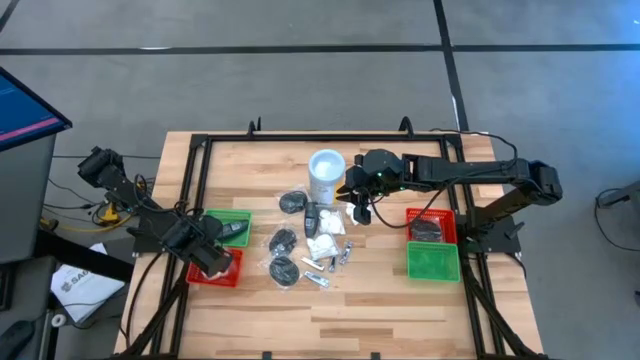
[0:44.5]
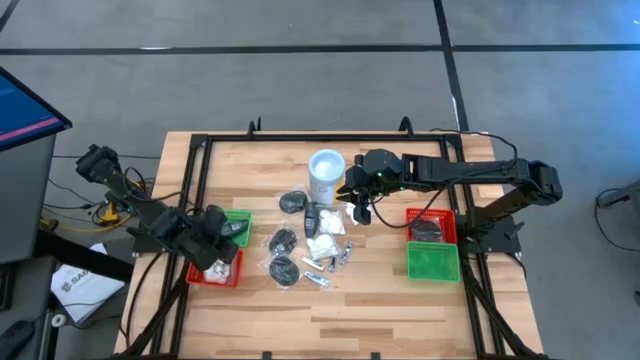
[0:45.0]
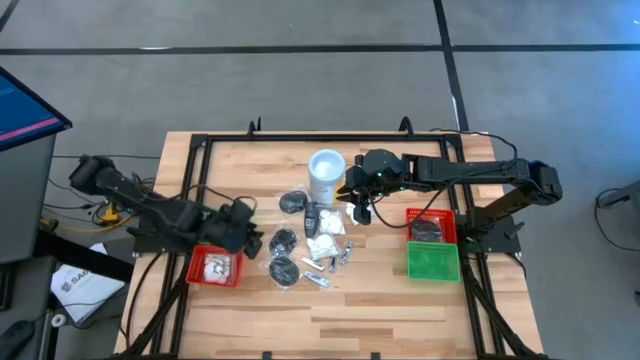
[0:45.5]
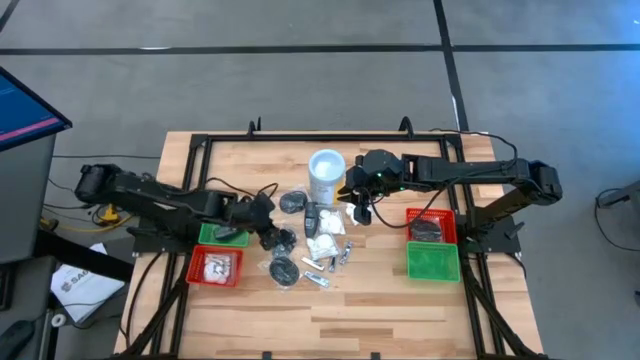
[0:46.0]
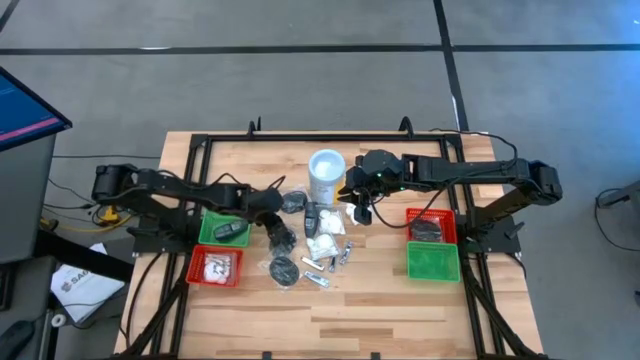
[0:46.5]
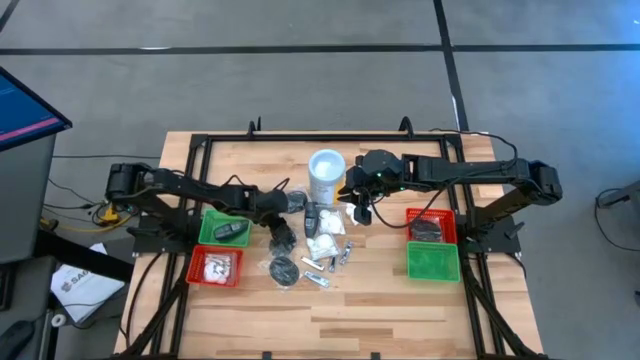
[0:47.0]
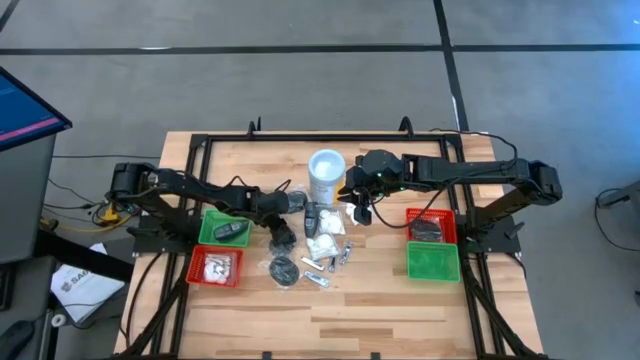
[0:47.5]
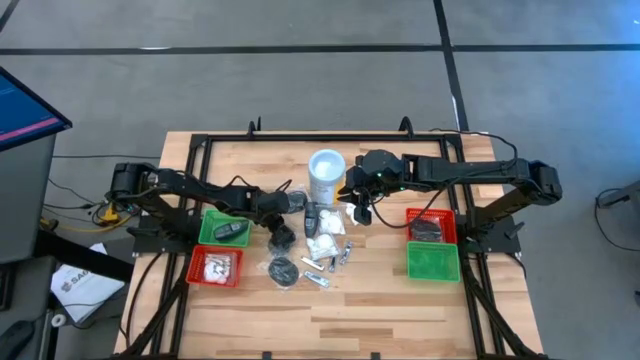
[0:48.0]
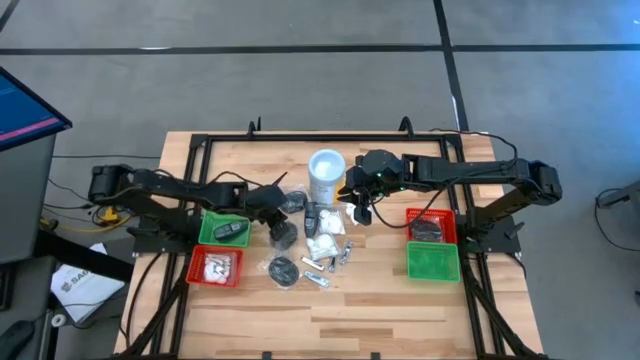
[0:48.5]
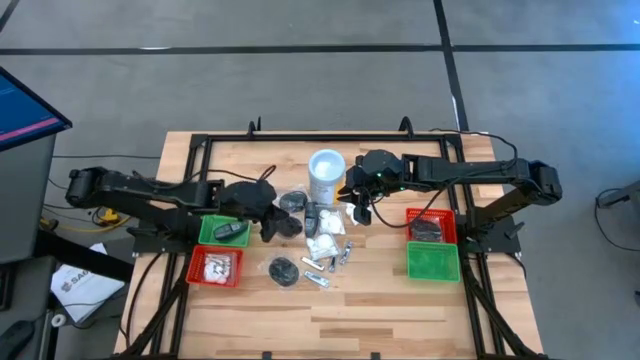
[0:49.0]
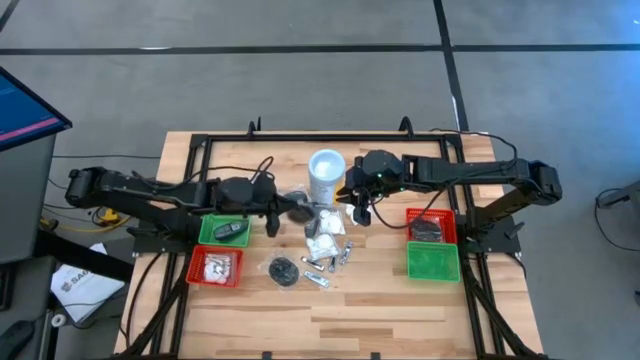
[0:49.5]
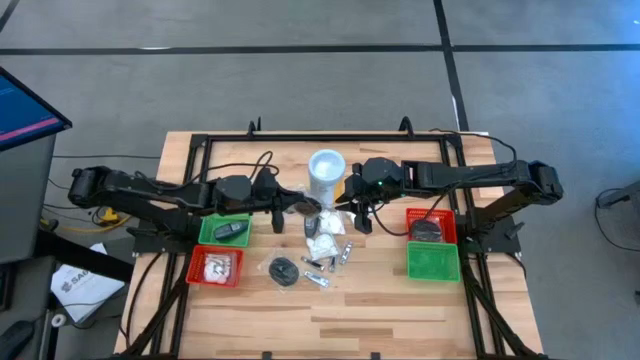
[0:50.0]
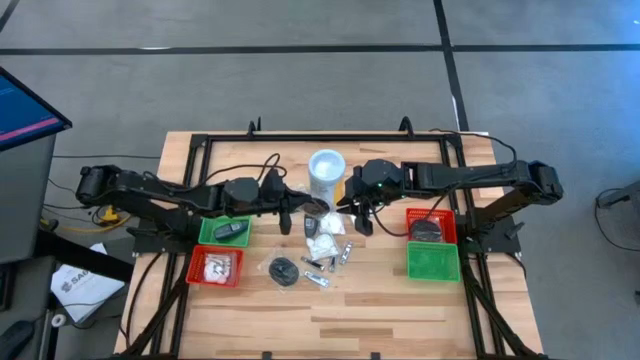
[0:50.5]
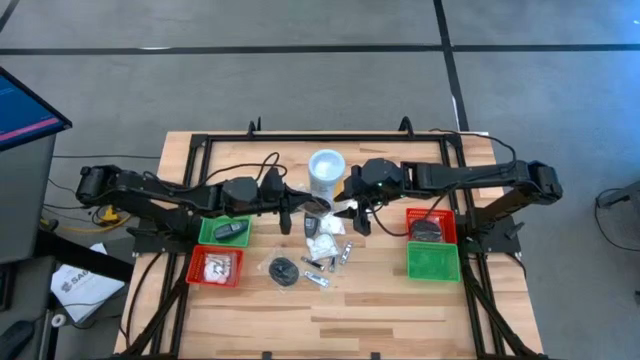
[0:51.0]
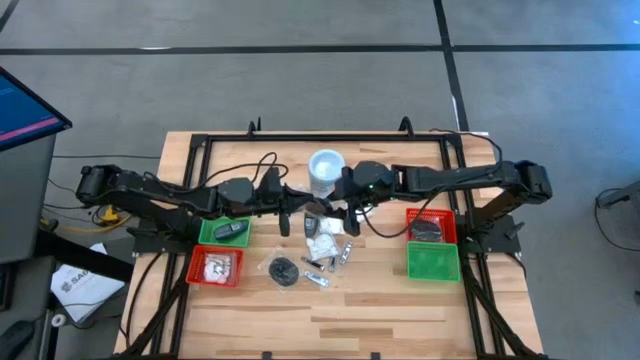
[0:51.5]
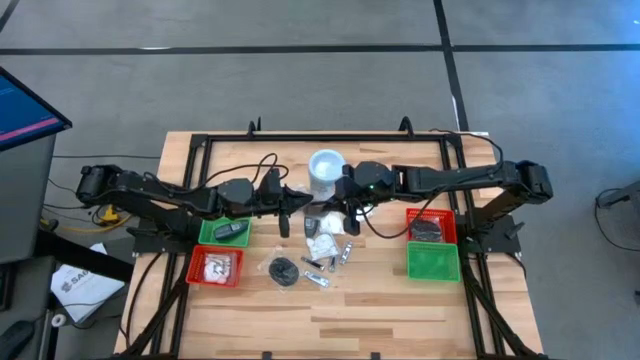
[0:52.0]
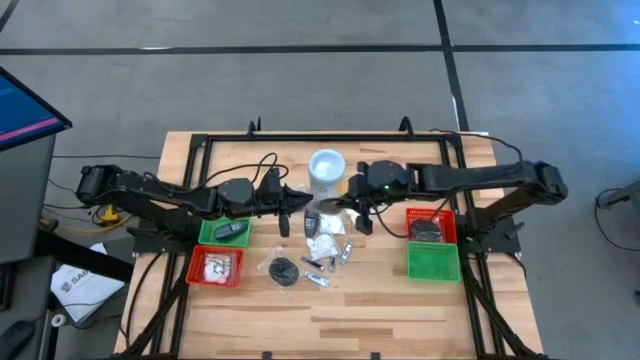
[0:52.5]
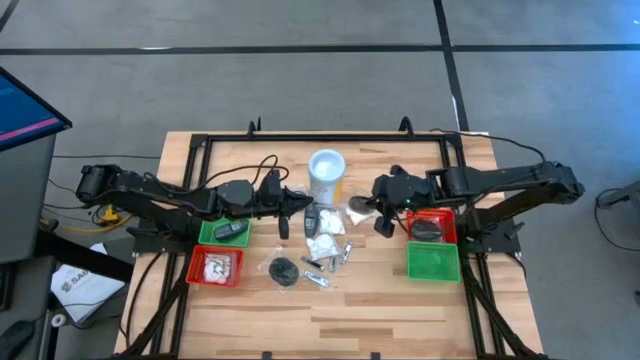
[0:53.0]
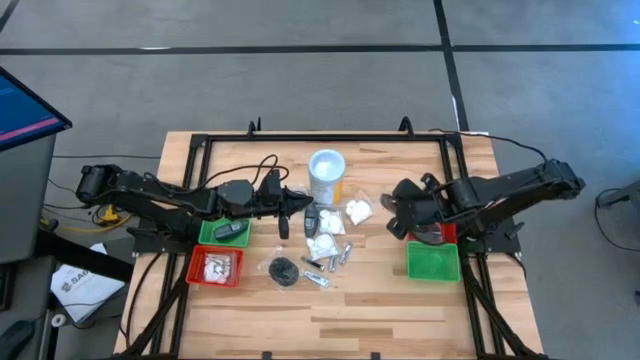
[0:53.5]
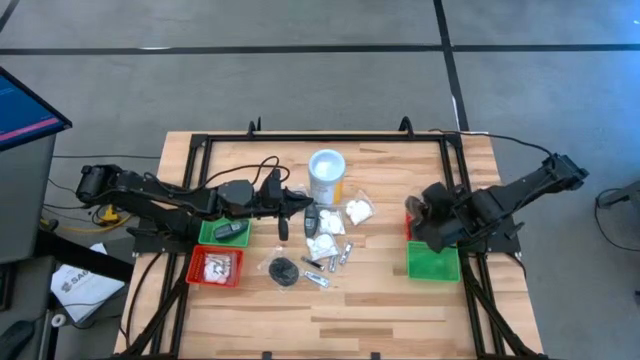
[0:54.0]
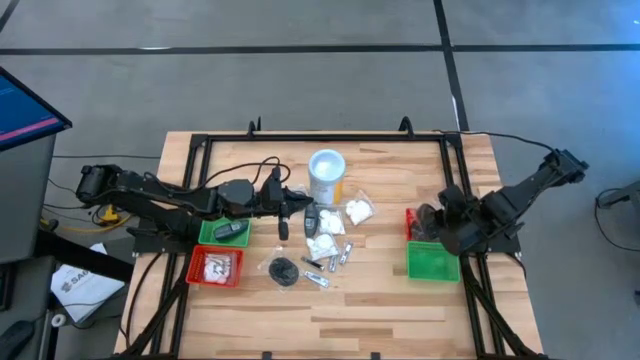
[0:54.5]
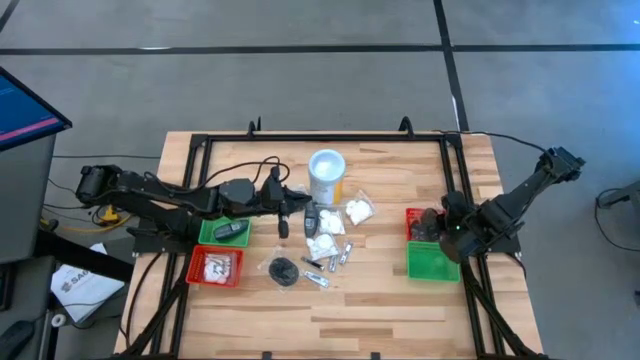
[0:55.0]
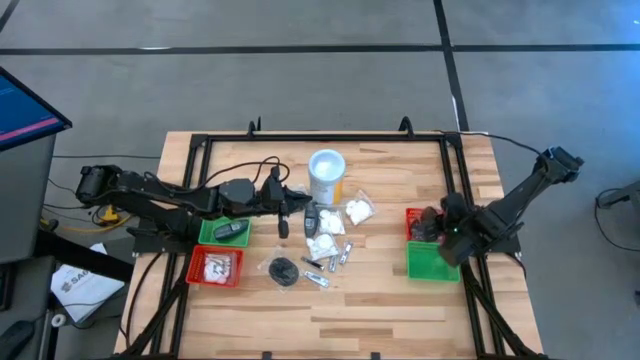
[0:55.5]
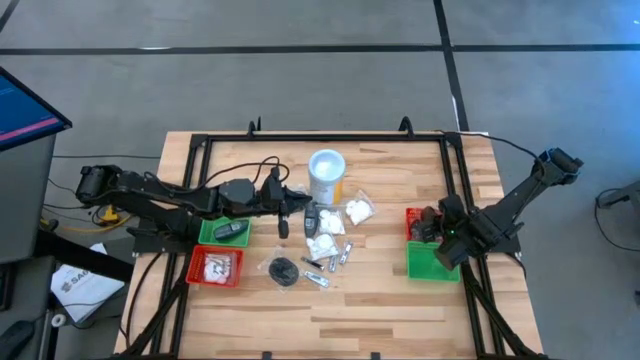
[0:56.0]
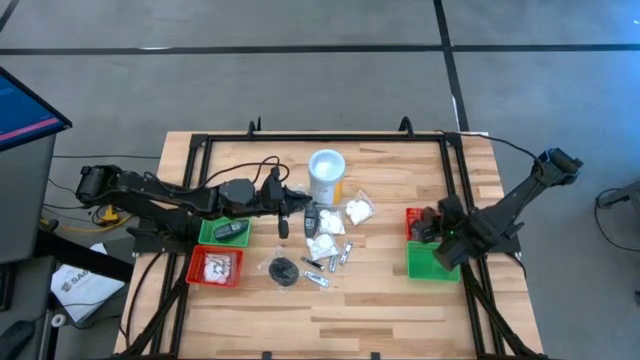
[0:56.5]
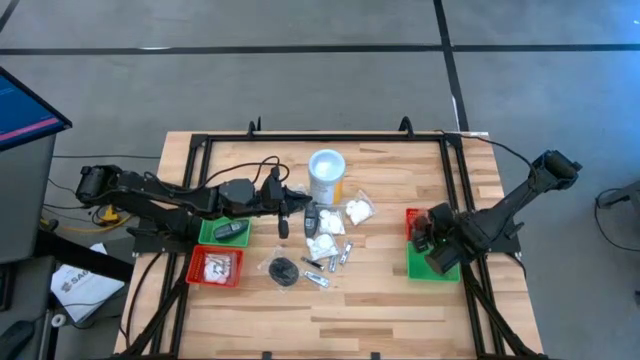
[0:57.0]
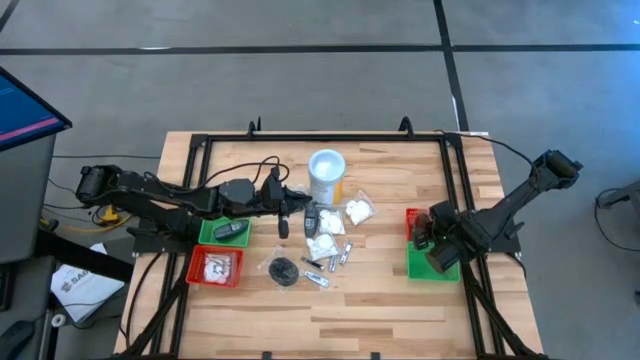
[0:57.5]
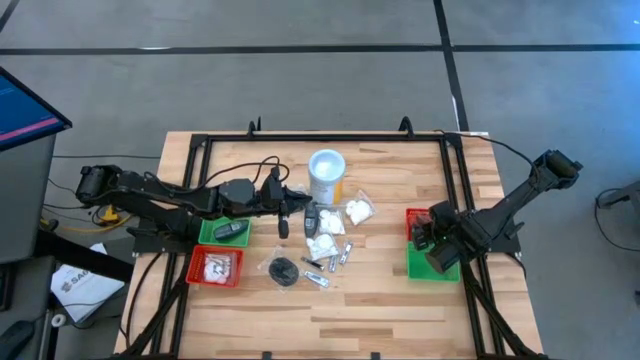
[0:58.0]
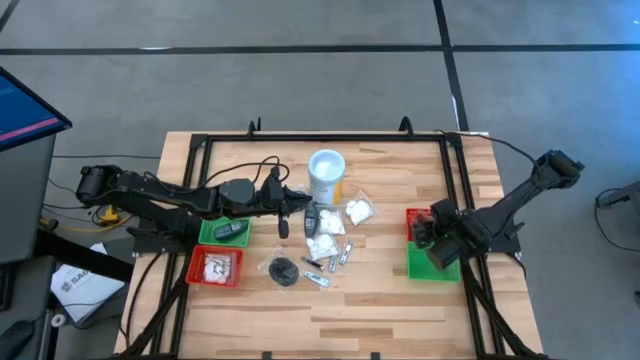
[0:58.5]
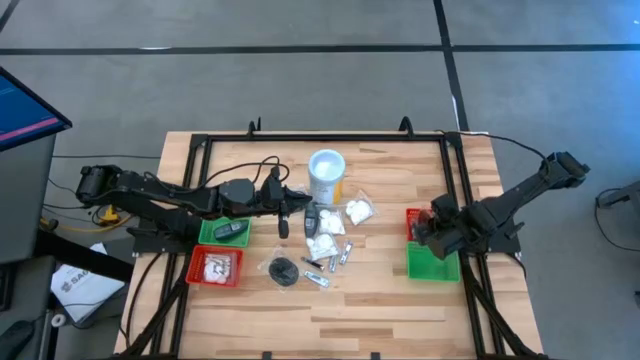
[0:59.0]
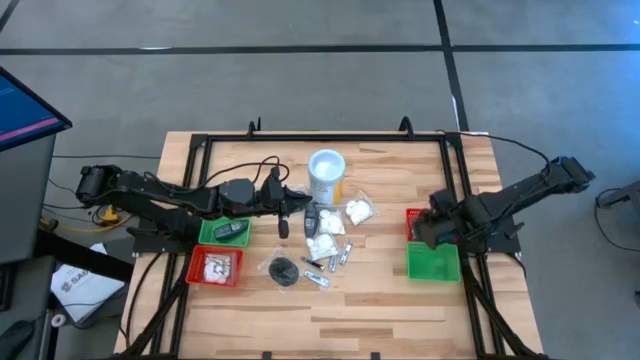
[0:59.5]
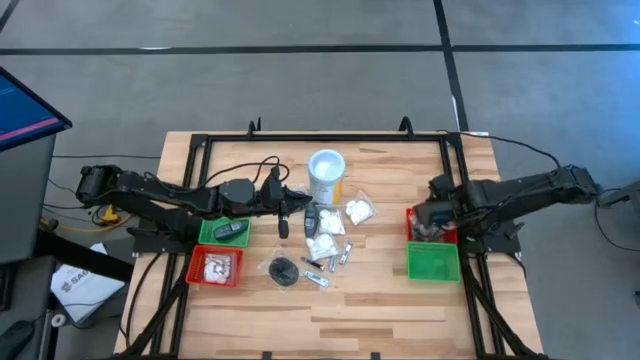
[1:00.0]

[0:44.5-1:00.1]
Task: Pick & Place Travel size toiletries
Put the hairbrush into the right red bin

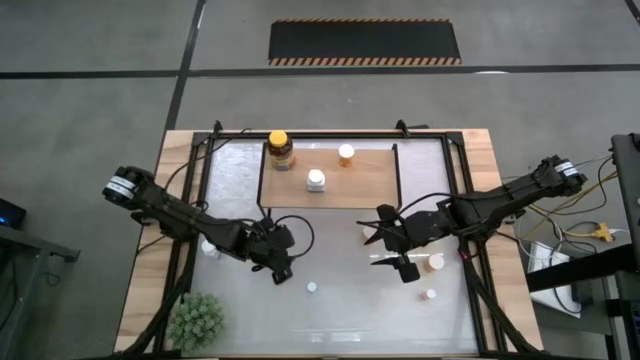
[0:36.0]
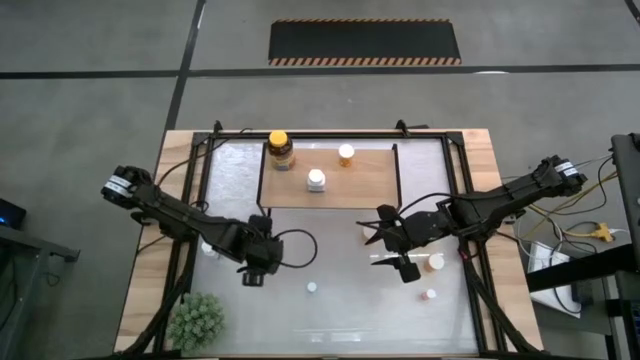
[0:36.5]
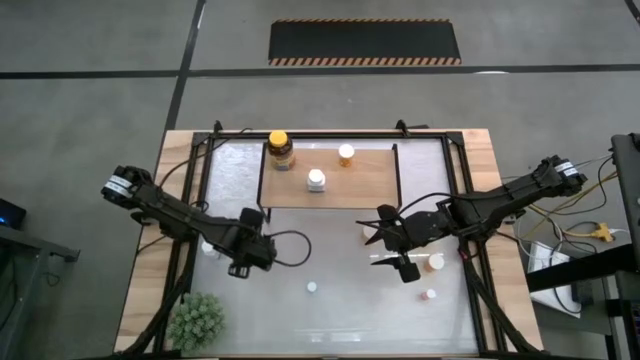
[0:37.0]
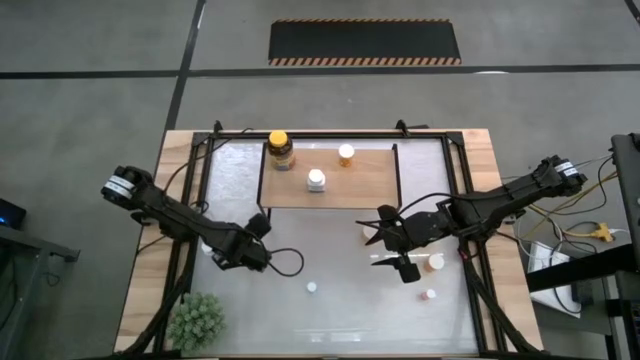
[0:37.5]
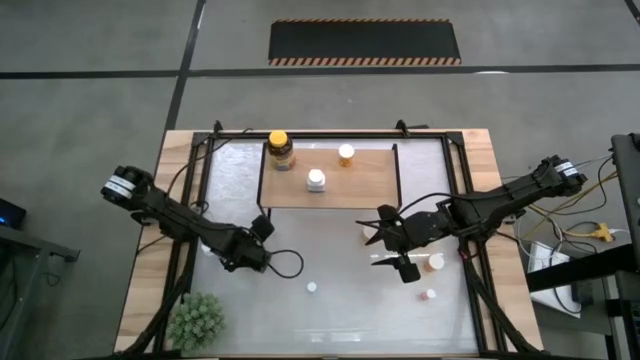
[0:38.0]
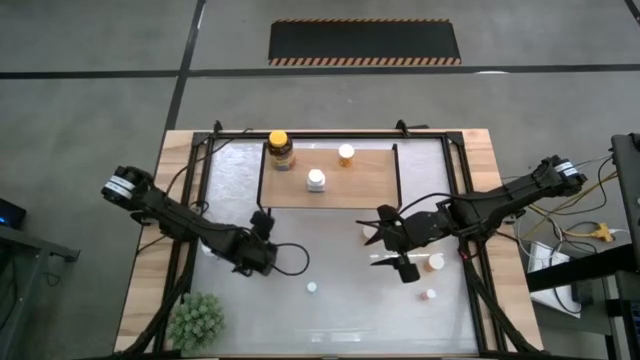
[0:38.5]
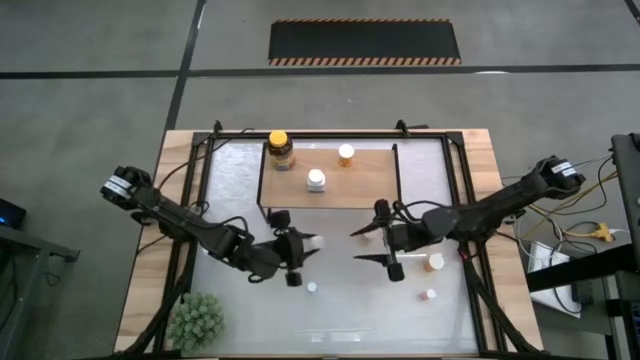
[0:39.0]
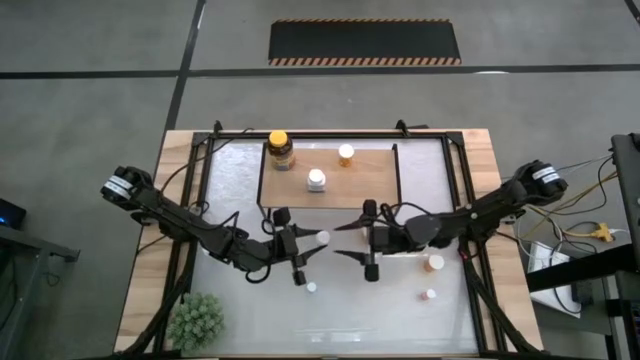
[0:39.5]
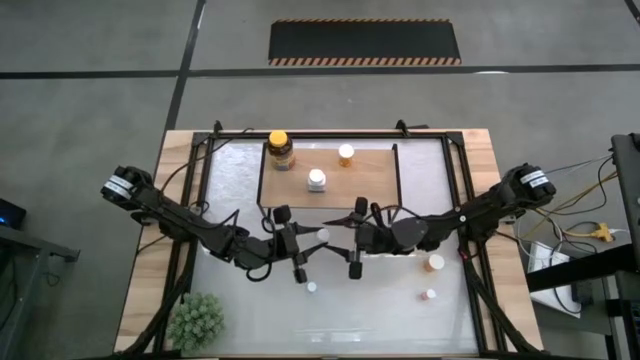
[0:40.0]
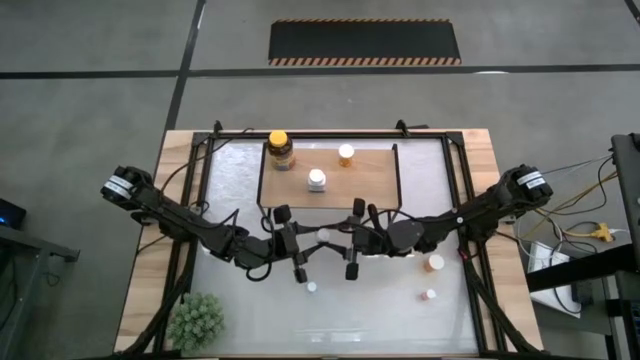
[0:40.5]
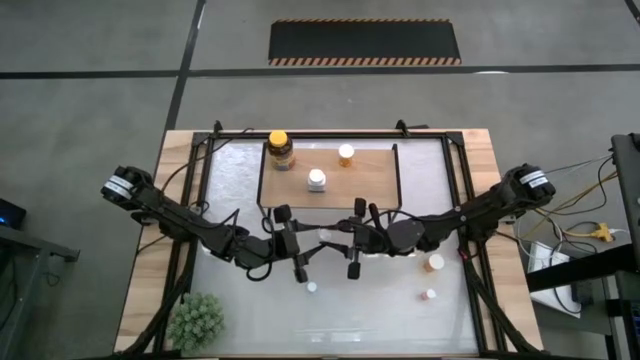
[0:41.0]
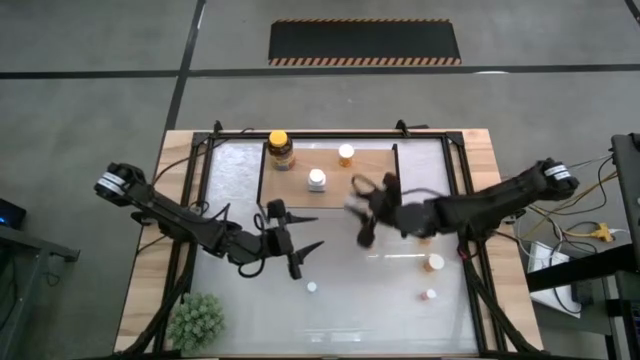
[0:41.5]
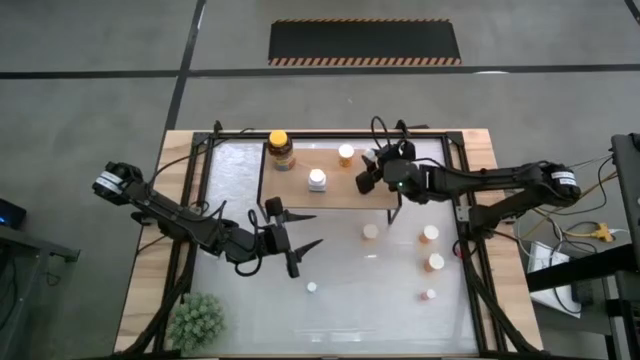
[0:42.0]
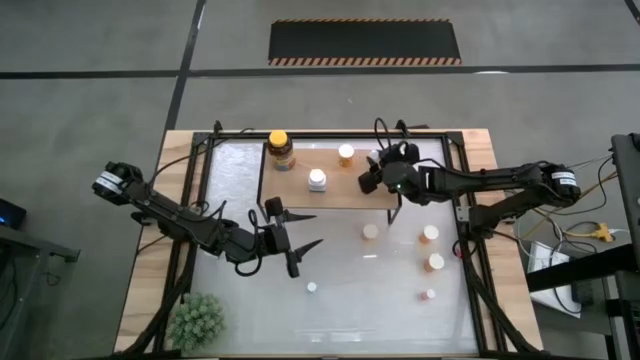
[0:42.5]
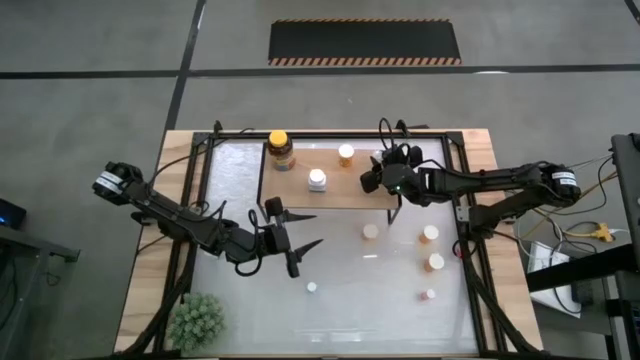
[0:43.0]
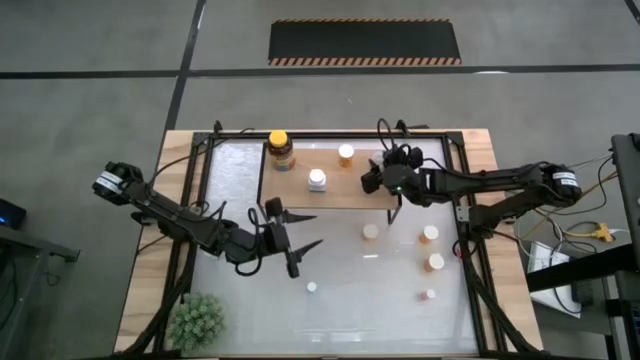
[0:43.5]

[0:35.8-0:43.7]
Task: Pick and place medicine bottles onto shelf by color
Put the white pill bottle on the shelf
